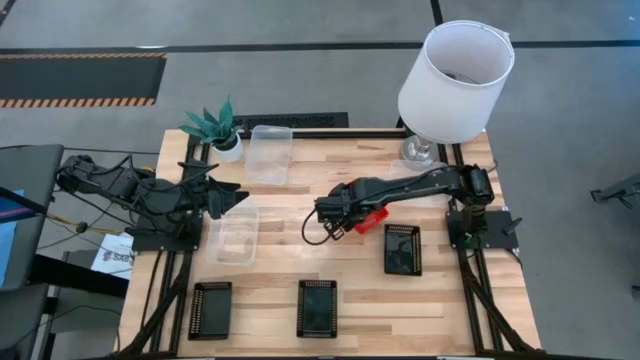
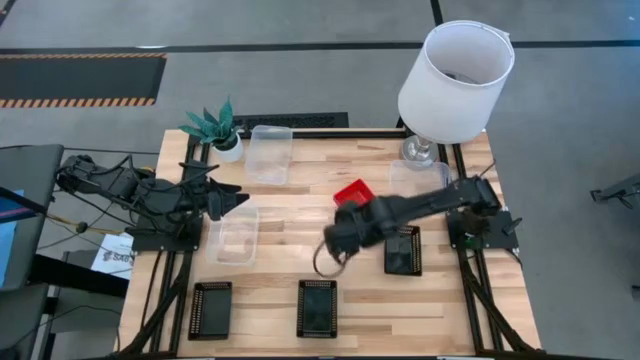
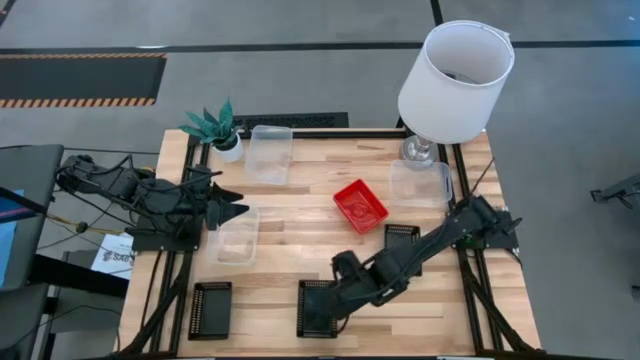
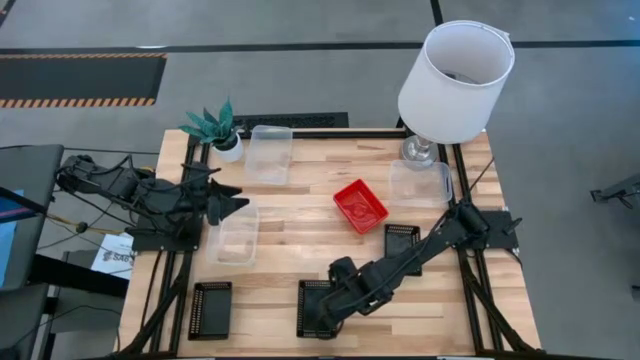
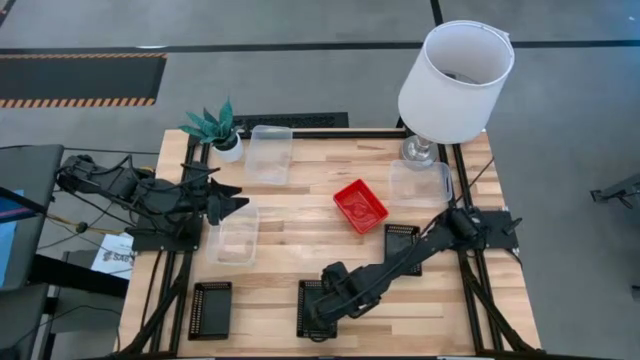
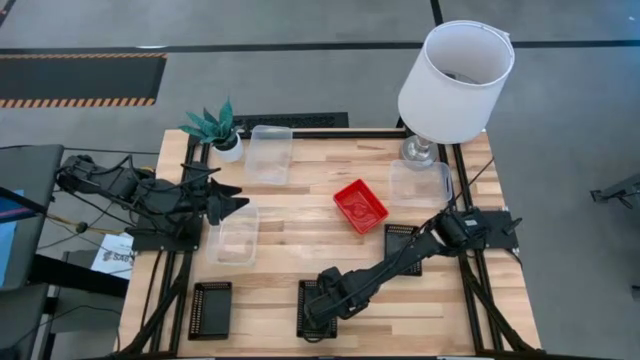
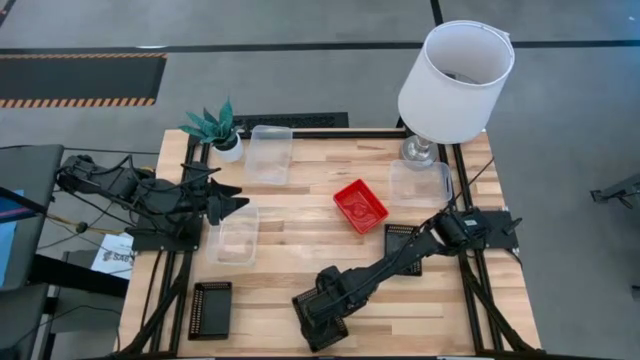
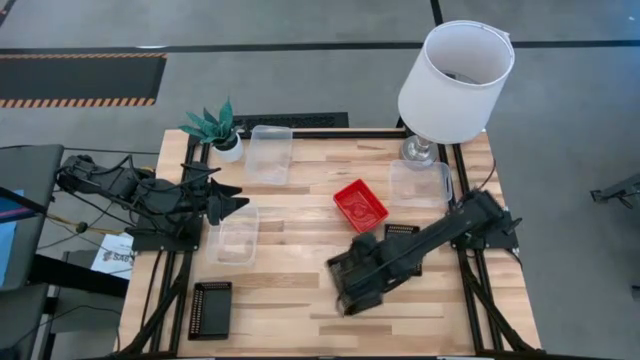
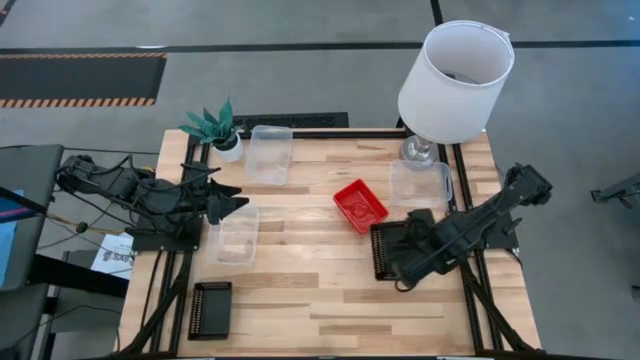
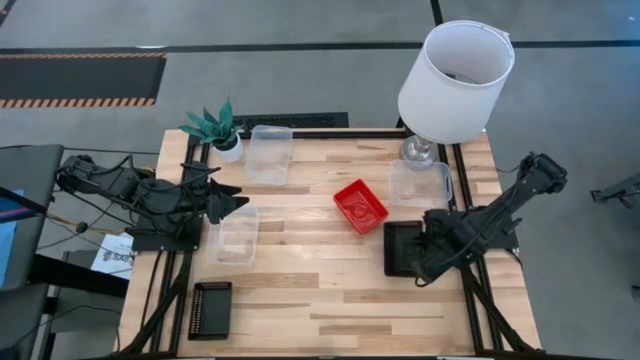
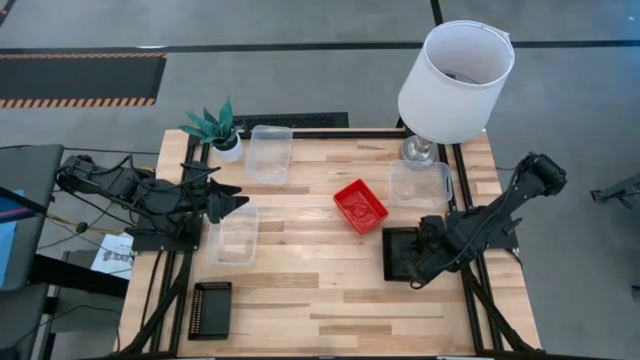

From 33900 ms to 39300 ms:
Stack the bottom right black bin on top of the right black bin

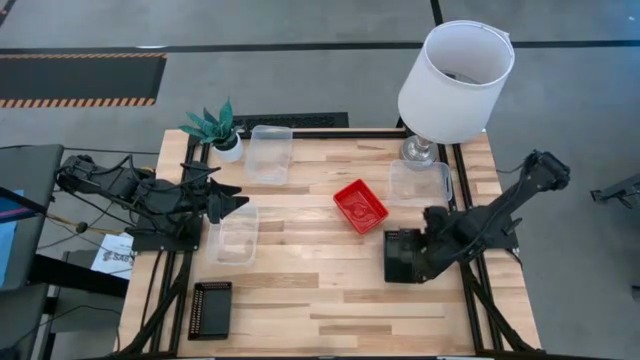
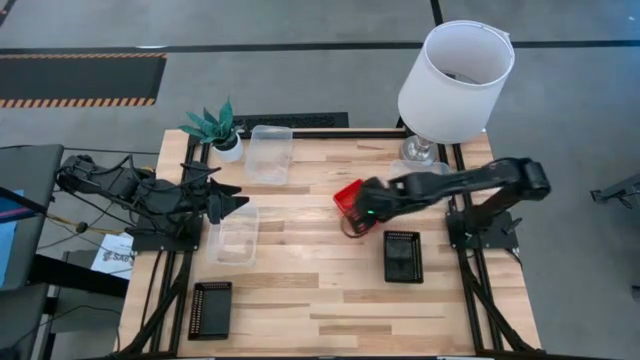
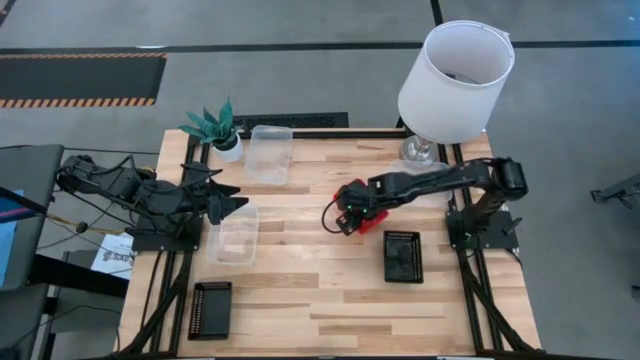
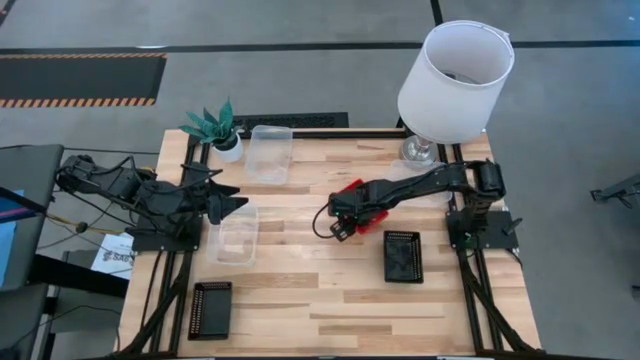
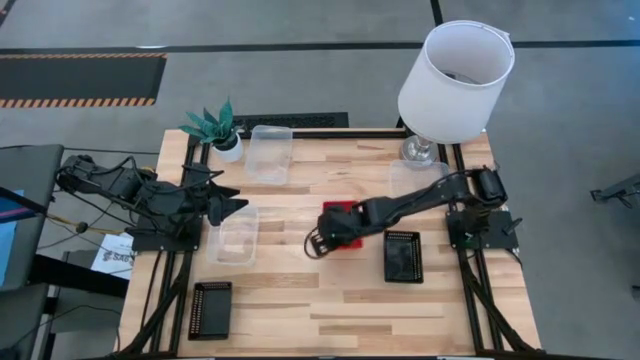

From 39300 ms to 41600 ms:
Adjust the stack of red bins

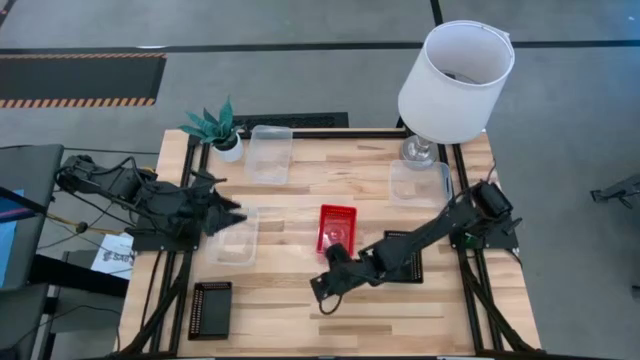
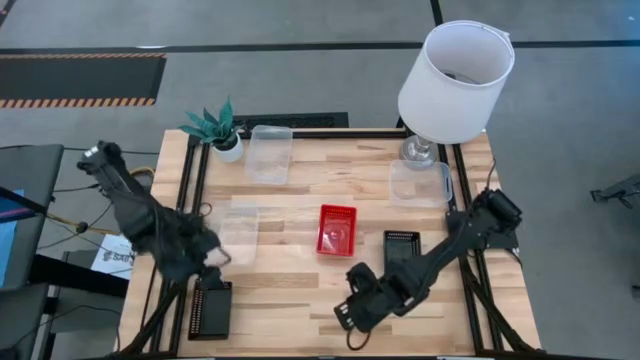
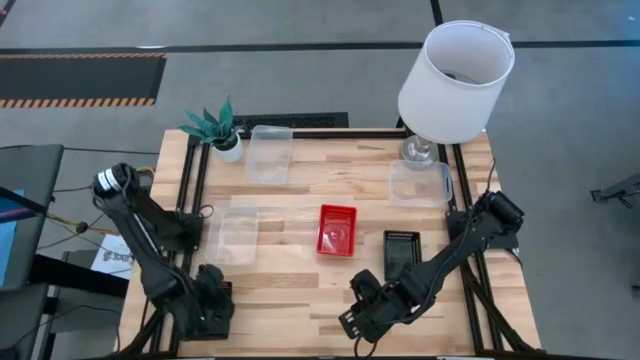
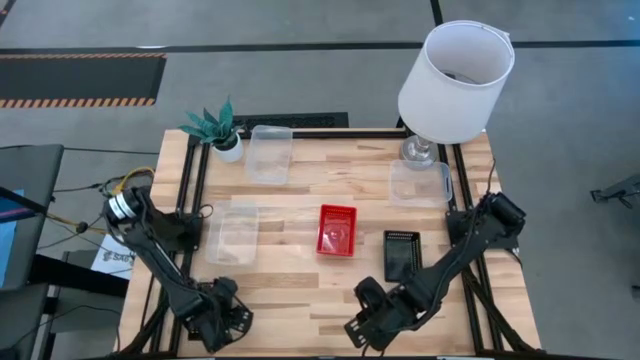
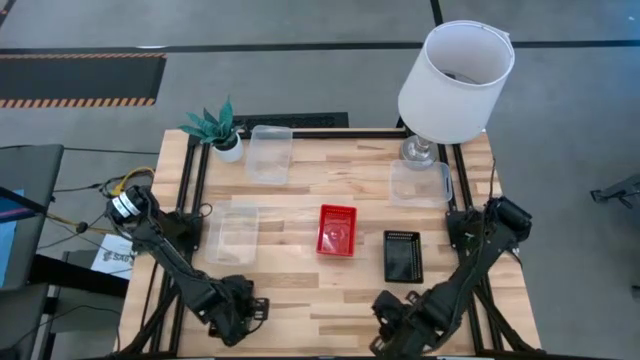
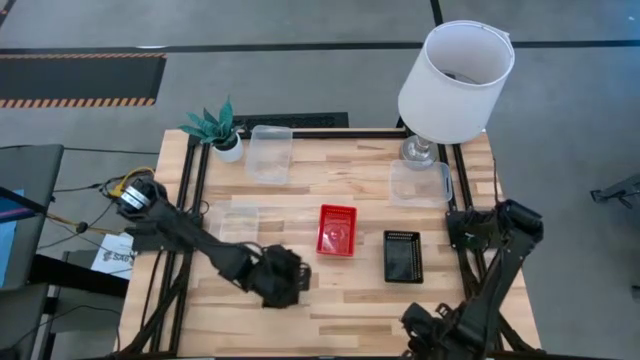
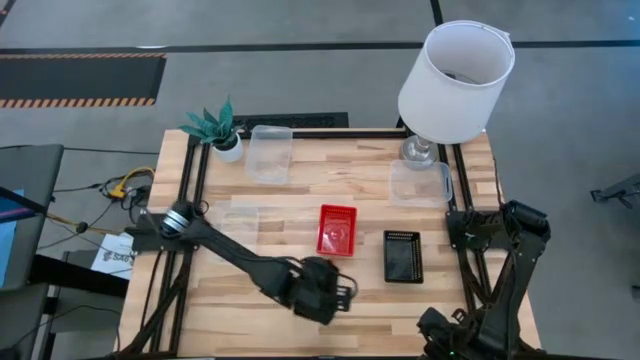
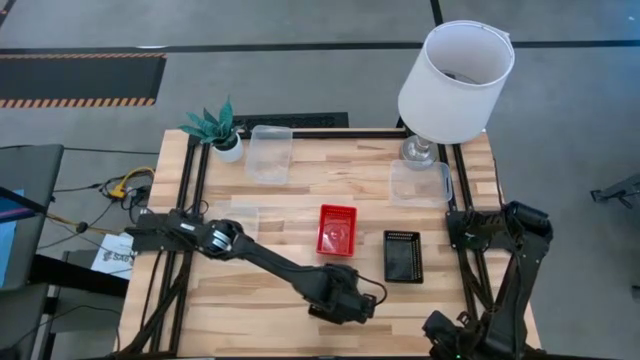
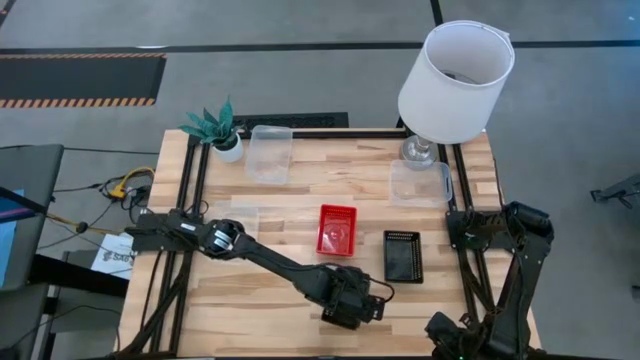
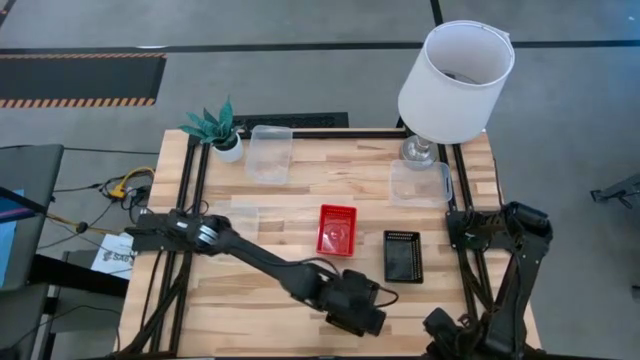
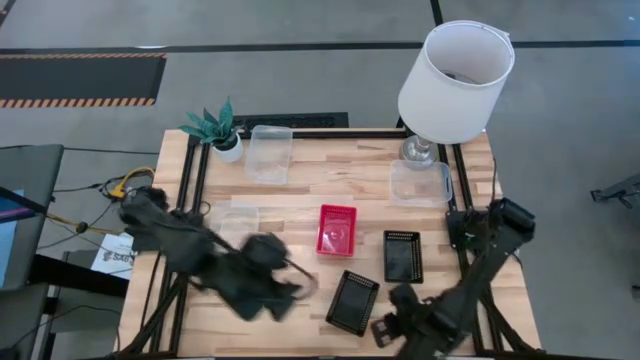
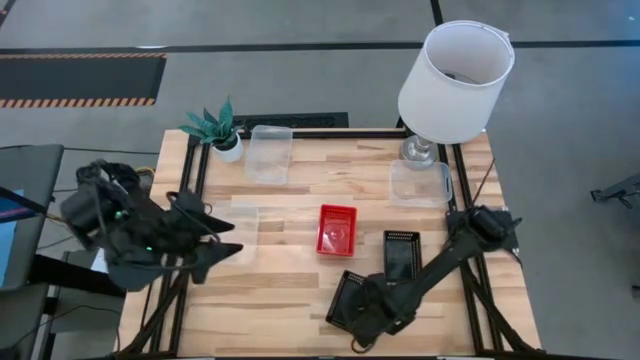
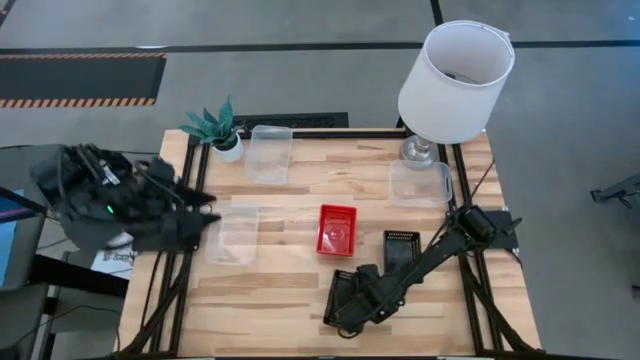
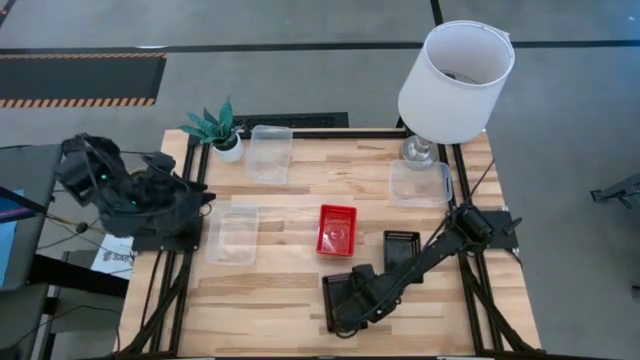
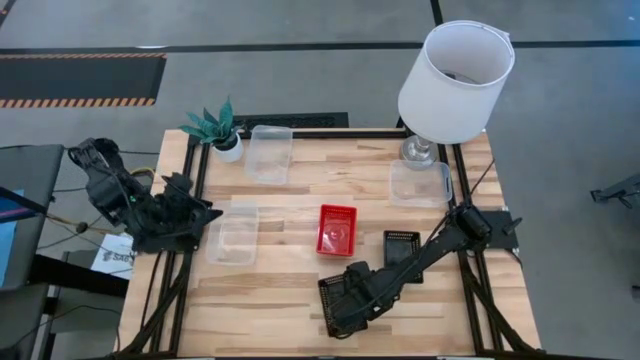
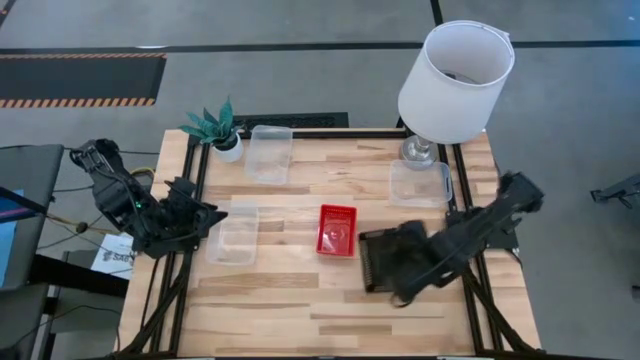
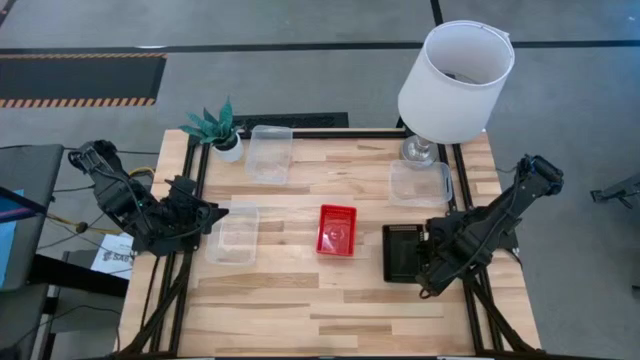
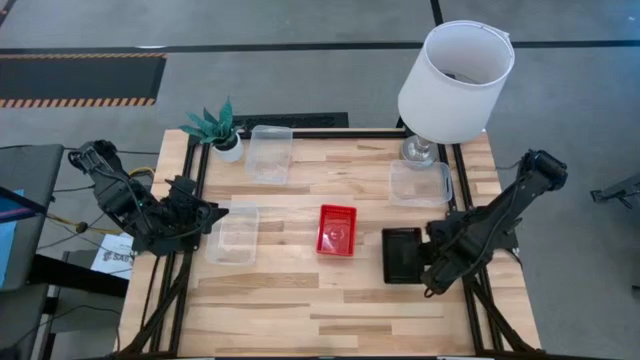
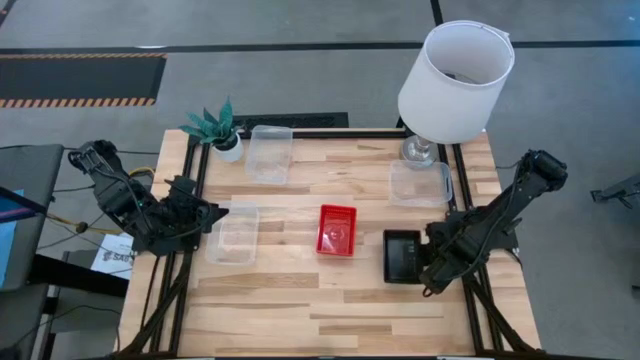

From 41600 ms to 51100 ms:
Stack the left black bin on top of the black bin

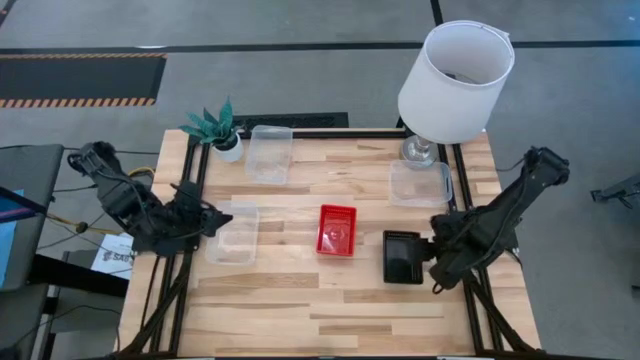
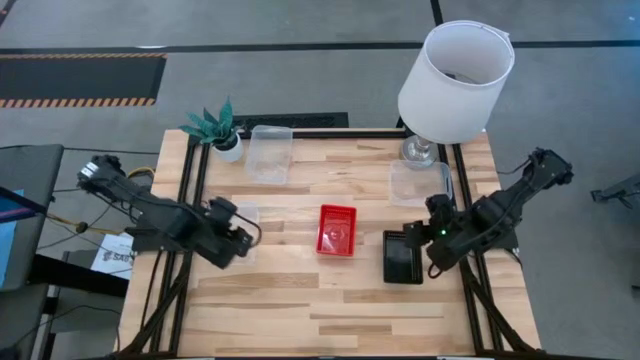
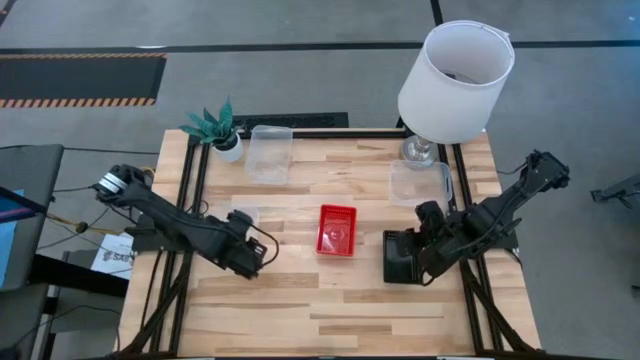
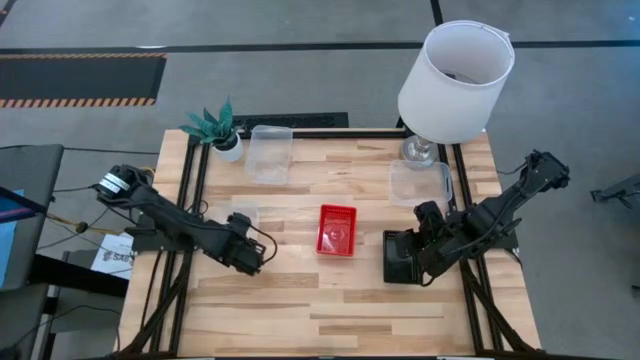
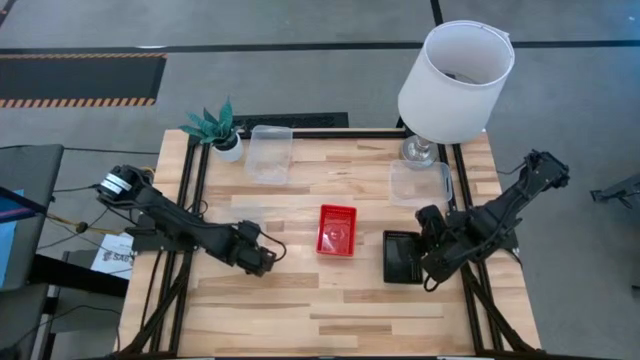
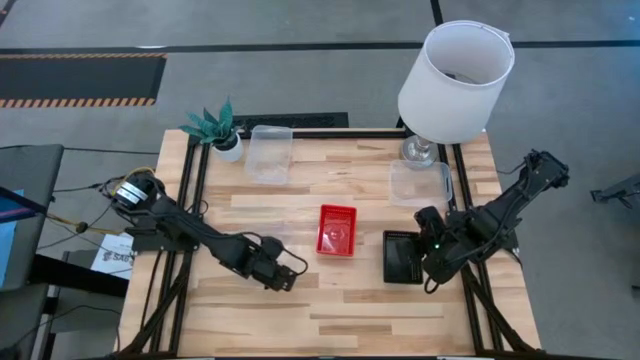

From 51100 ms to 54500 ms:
Move the bottom transparent bin to the center of the table
